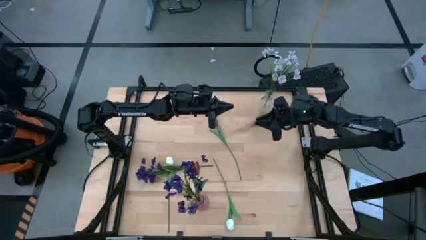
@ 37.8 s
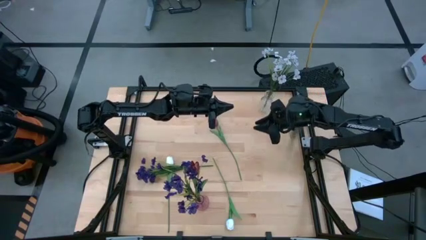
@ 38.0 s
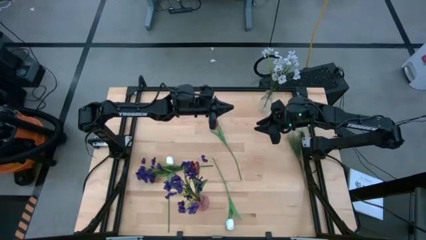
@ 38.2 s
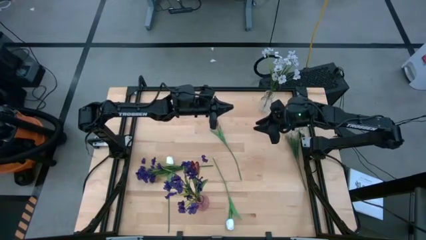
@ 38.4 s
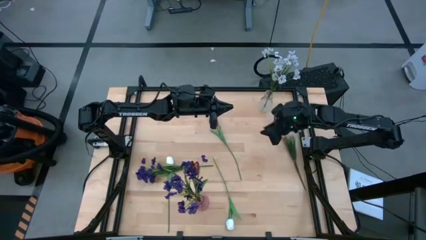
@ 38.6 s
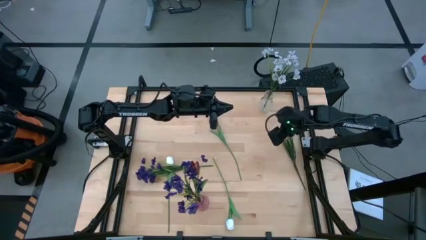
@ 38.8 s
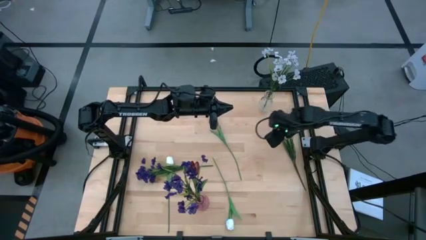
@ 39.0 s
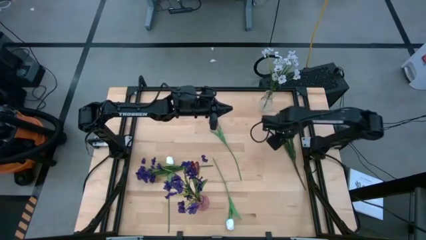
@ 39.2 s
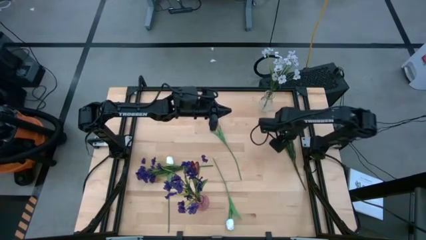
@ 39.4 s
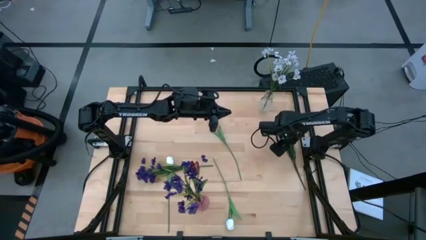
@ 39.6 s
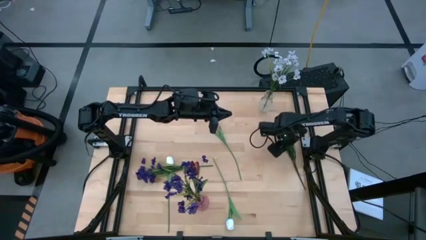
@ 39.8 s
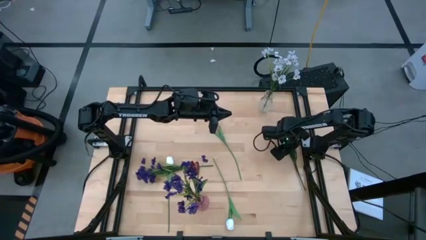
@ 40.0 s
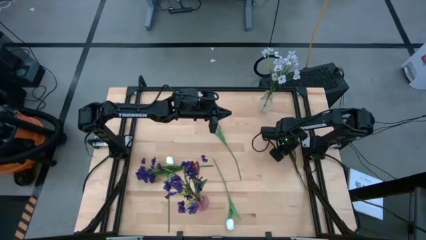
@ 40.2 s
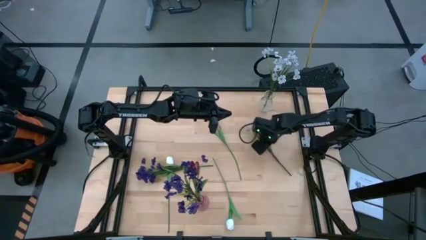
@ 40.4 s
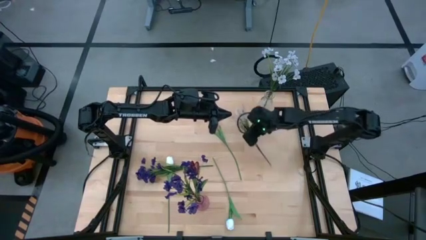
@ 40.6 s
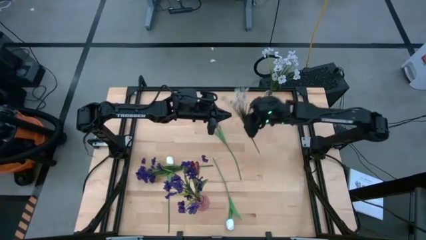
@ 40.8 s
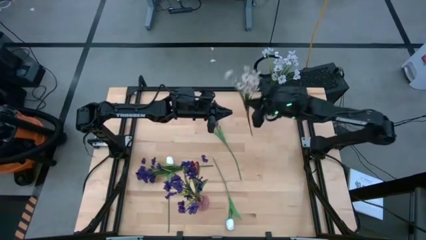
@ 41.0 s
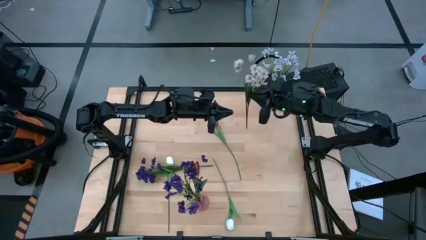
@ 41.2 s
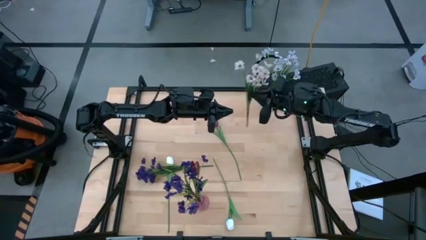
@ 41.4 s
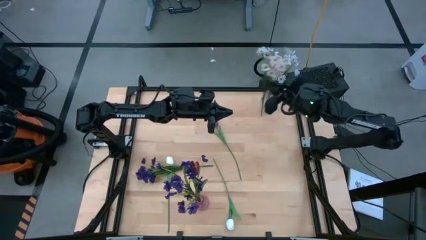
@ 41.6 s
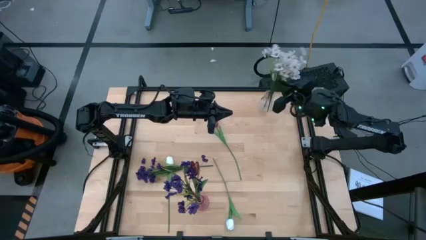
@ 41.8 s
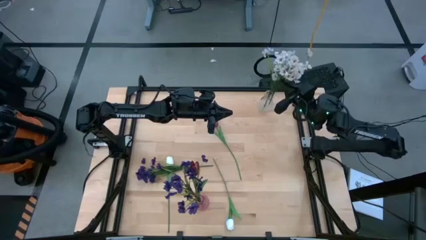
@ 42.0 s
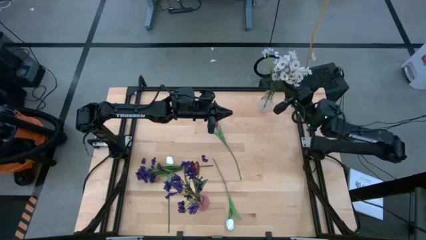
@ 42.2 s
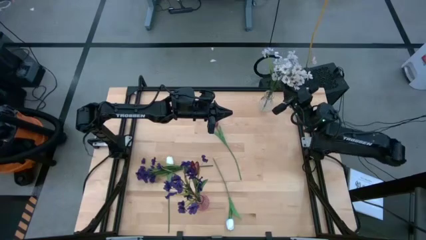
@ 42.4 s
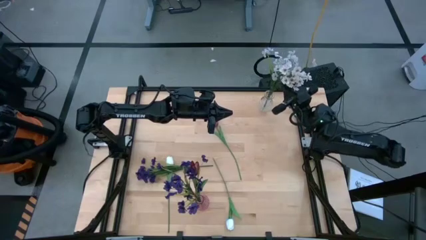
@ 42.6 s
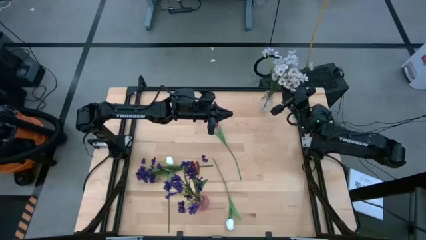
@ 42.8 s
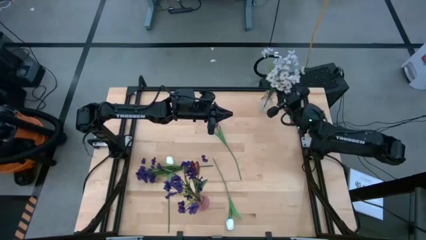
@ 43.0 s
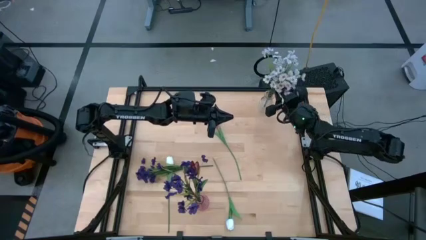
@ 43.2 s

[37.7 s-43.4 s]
Task: Sort flowers into vase by color
Put the white flower into the transparent vase

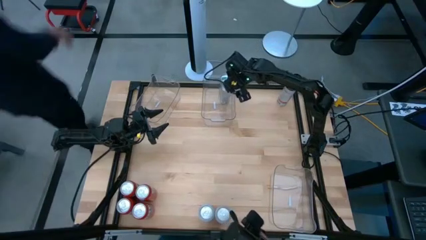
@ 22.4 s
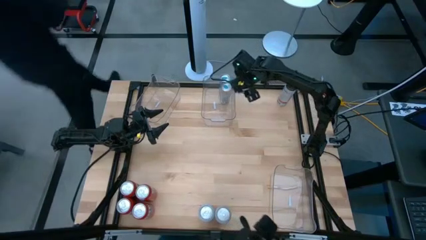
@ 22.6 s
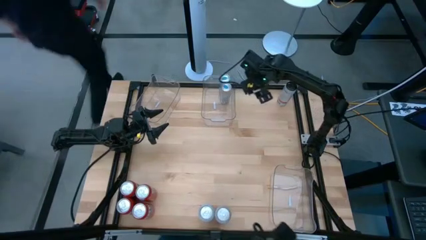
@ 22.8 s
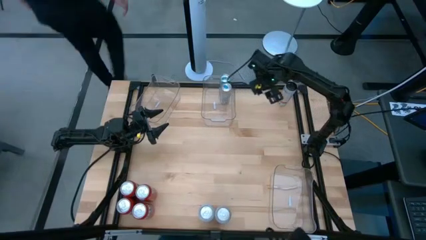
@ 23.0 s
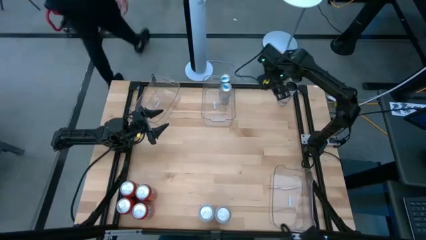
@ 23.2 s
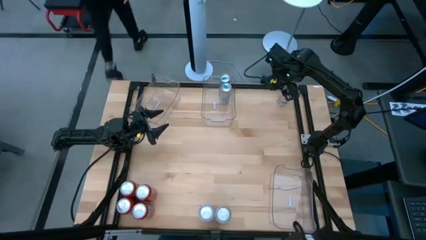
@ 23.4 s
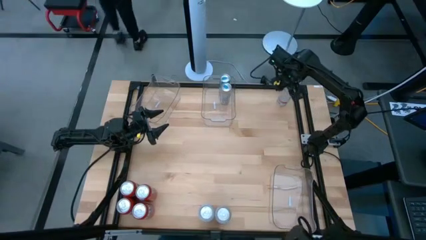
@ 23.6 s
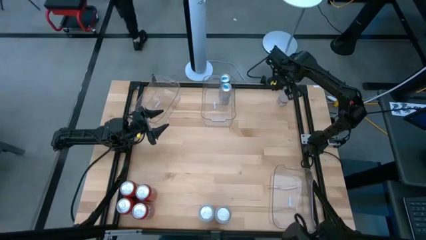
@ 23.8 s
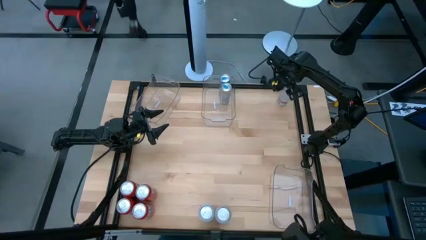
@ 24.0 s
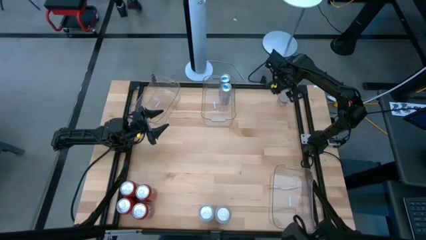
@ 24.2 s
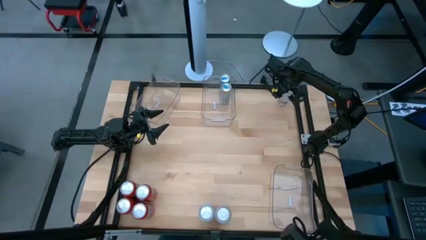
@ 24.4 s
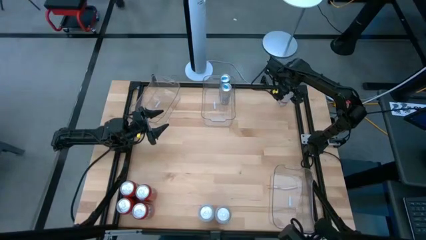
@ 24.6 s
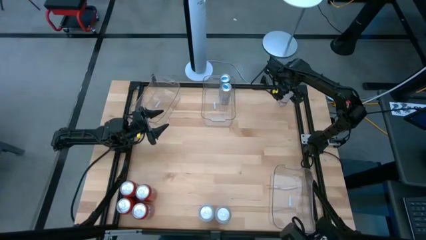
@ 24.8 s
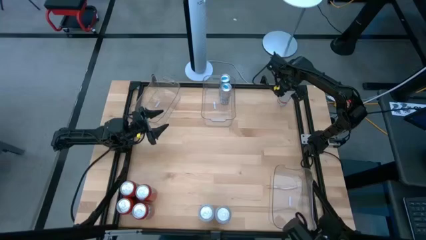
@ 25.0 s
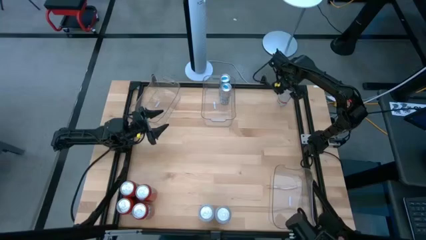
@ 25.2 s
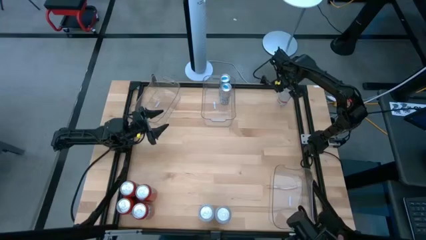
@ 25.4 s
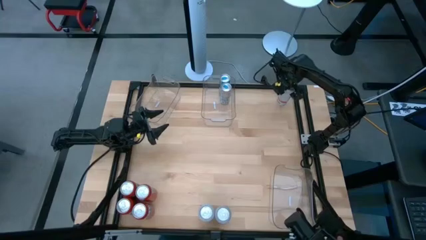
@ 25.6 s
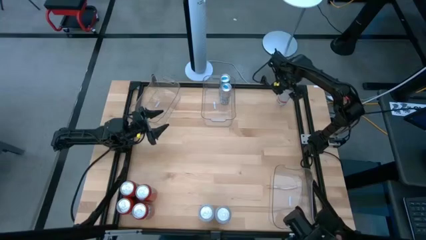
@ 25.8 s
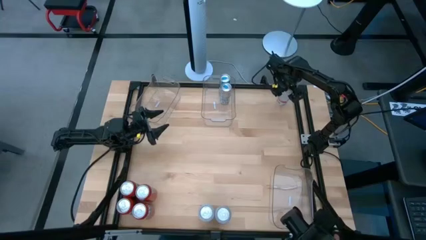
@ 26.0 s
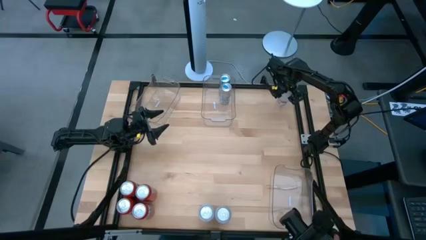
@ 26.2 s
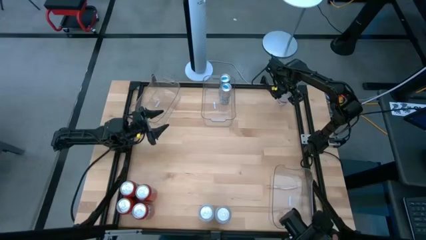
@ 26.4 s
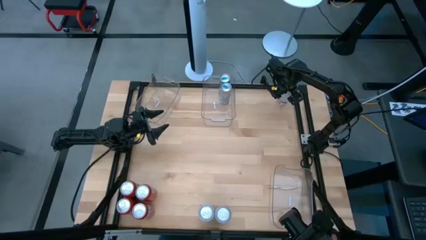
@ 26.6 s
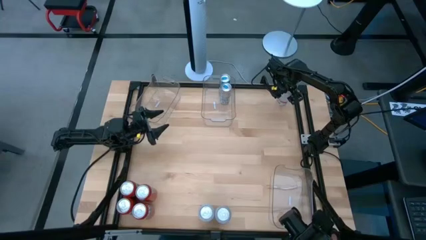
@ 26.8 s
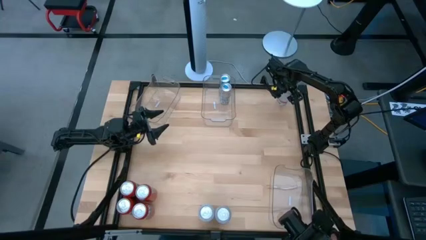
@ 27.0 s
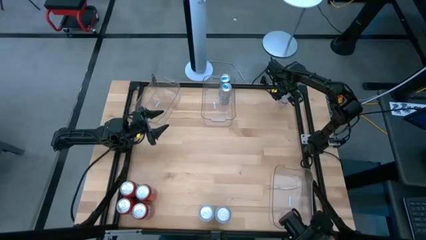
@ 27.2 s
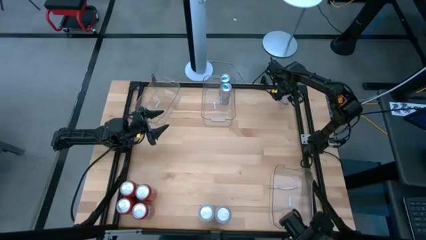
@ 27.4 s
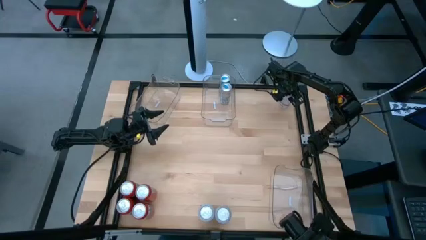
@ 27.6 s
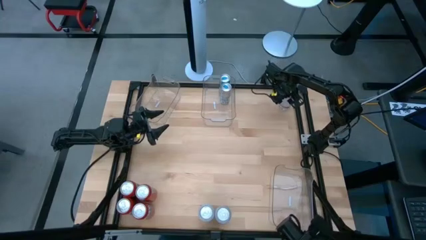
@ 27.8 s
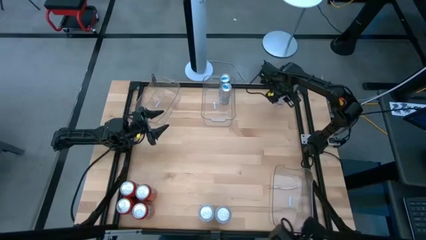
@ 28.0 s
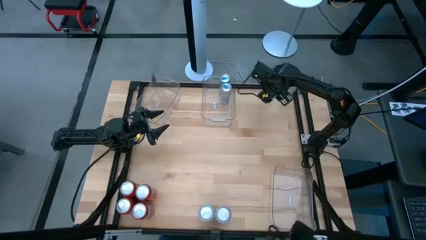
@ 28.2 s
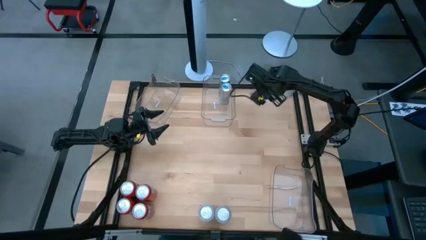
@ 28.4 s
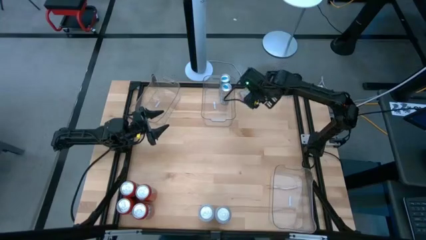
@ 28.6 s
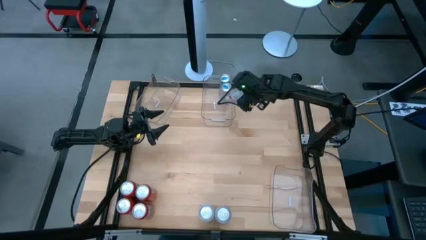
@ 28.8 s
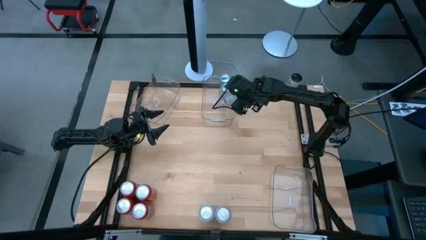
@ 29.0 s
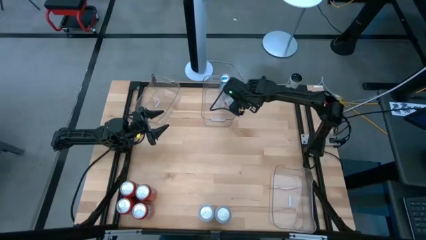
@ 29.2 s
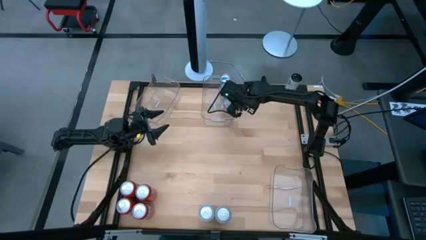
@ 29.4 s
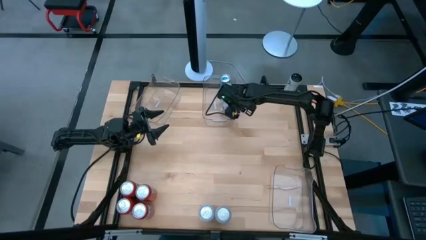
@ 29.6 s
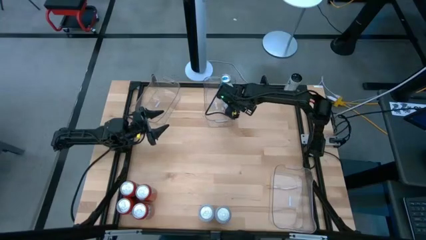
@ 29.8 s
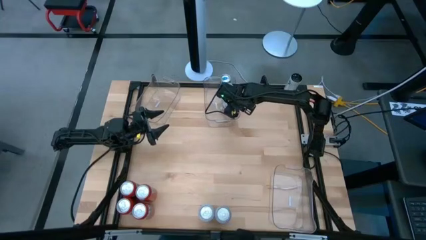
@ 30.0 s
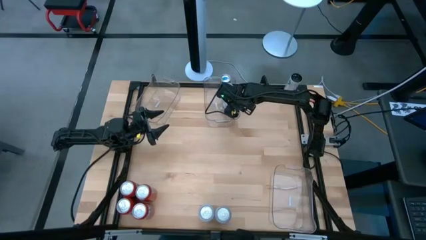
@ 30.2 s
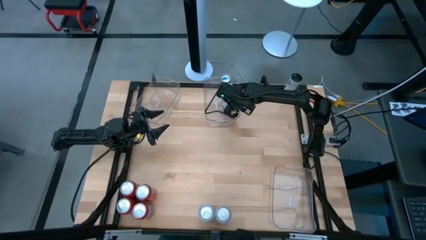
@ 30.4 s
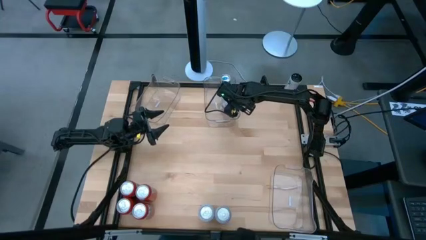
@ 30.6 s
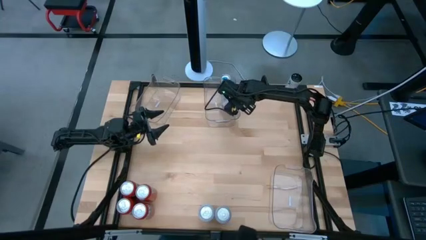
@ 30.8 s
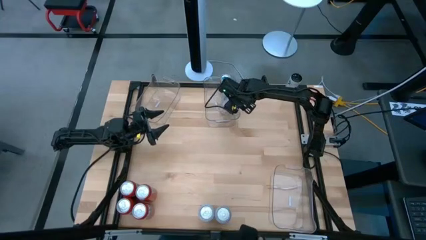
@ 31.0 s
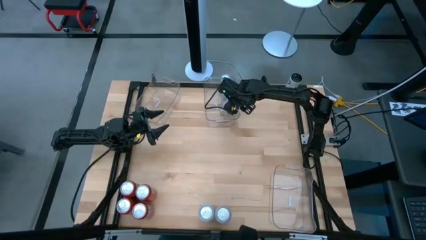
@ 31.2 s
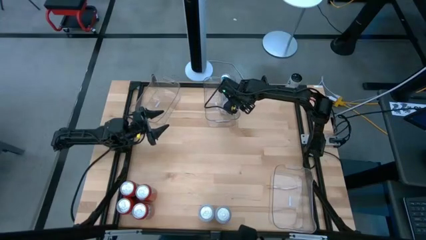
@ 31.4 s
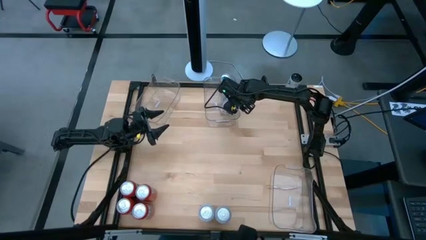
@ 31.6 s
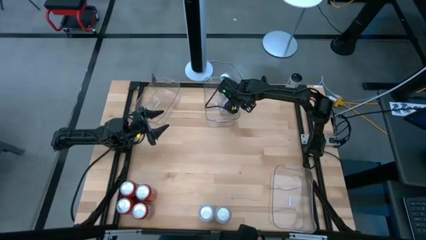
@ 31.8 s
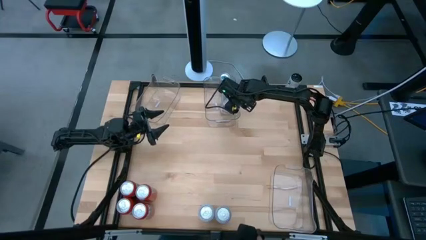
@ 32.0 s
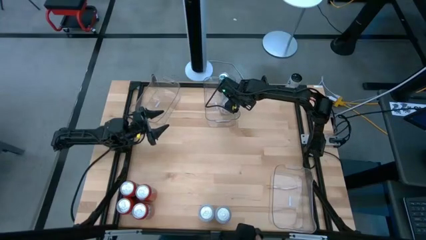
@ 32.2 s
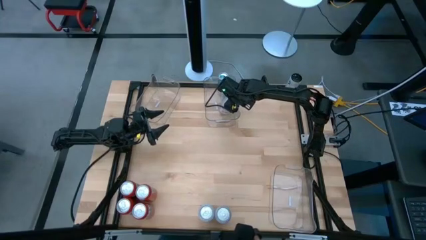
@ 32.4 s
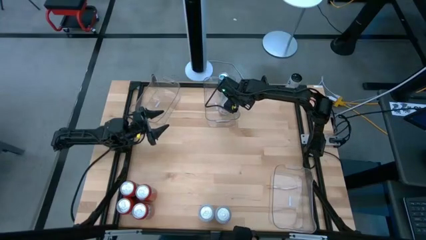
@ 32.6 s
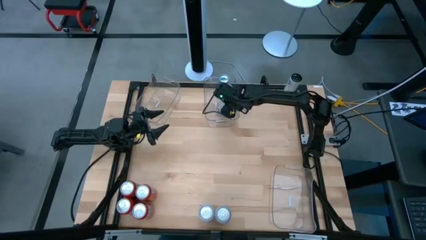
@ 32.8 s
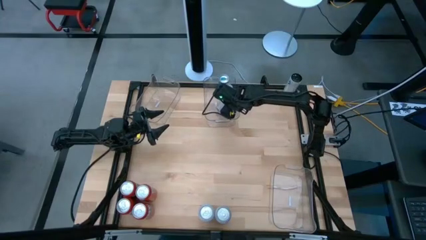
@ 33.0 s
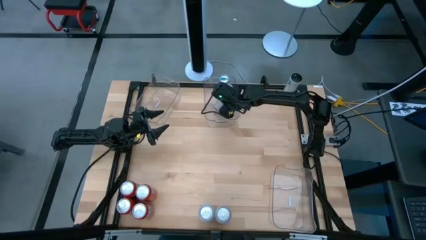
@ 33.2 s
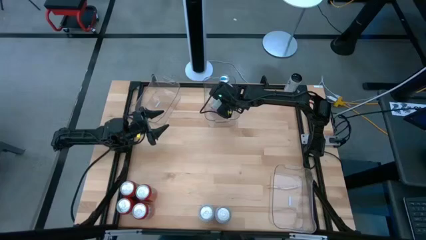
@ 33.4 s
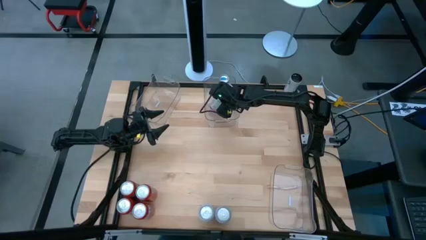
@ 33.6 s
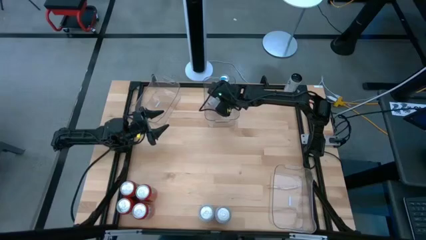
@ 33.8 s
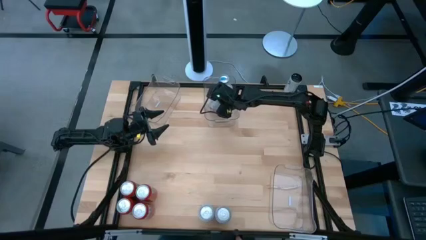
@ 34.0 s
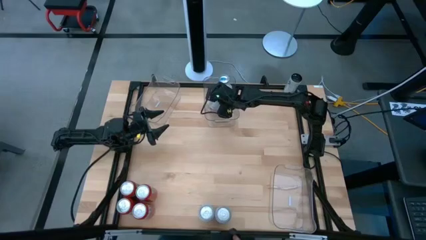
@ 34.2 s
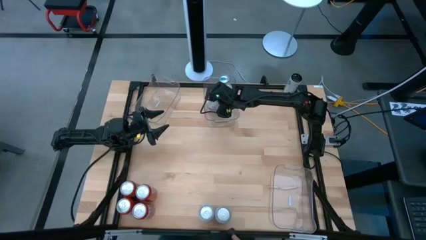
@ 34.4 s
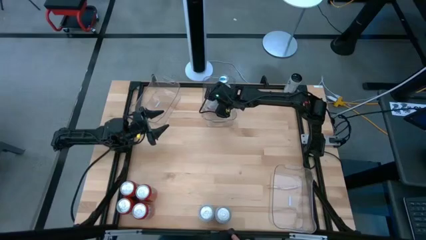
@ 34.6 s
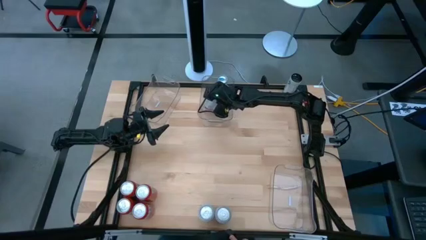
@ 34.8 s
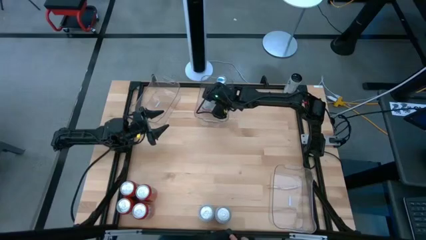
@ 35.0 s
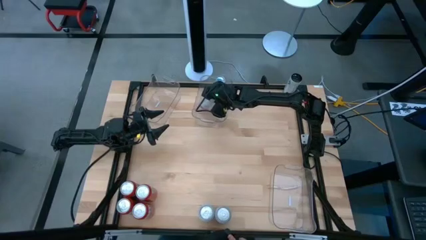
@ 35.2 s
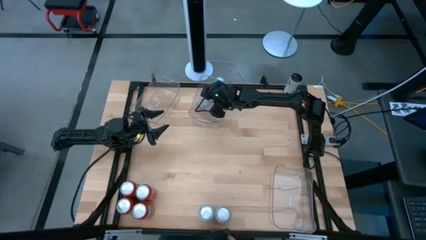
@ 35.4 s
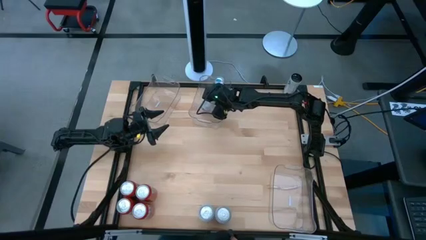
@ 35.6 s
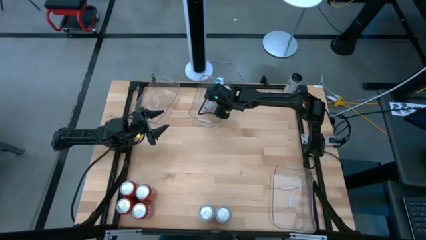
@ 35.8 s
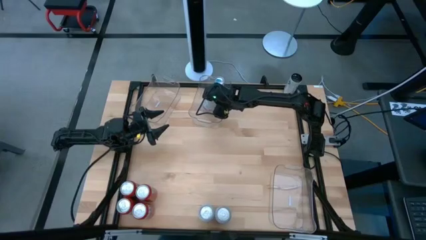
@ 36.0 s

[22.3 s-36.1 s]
Task: Sort soda cans
Put the bottom white pink soda can into the top middle transparent bin
